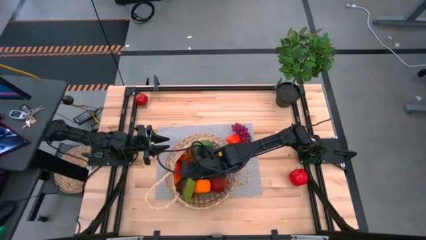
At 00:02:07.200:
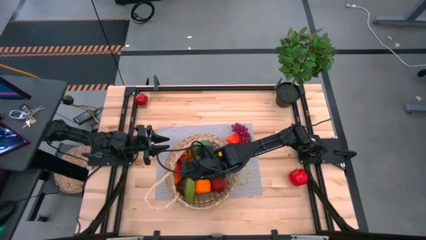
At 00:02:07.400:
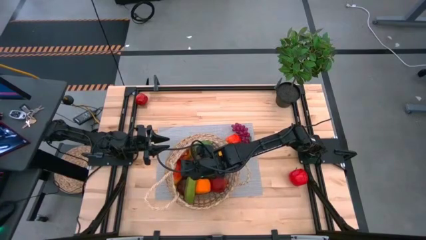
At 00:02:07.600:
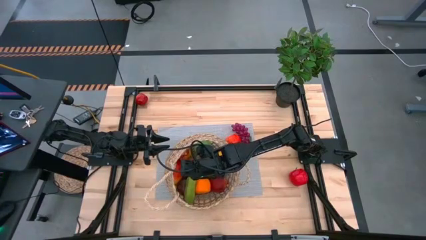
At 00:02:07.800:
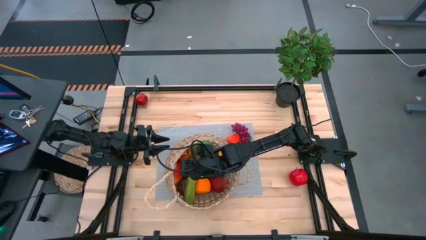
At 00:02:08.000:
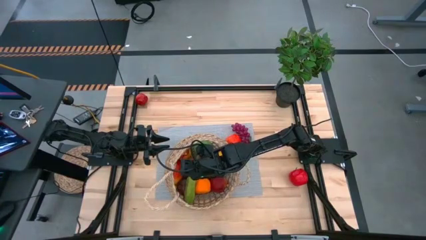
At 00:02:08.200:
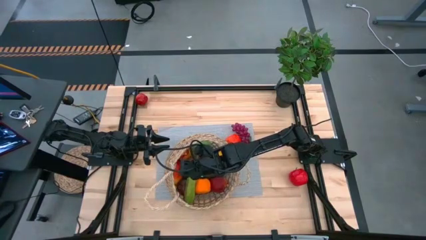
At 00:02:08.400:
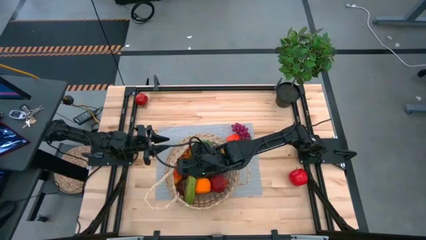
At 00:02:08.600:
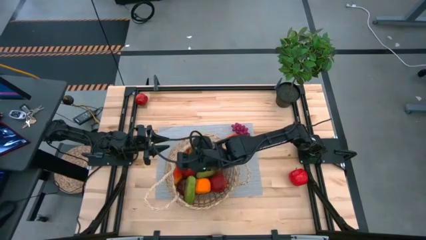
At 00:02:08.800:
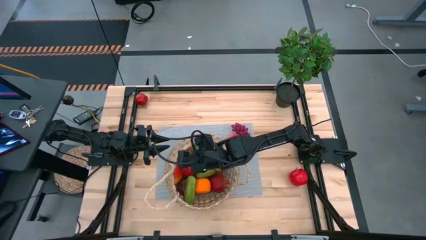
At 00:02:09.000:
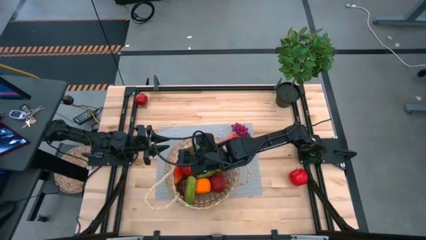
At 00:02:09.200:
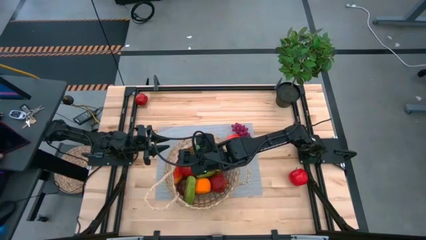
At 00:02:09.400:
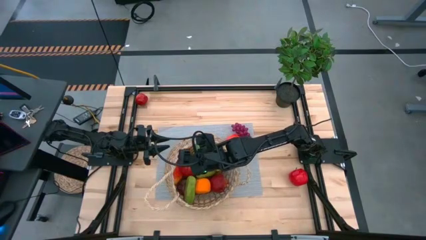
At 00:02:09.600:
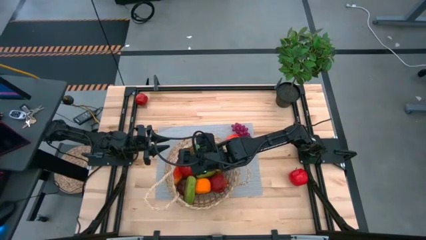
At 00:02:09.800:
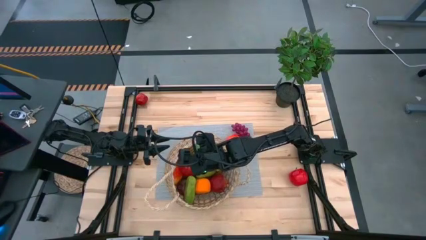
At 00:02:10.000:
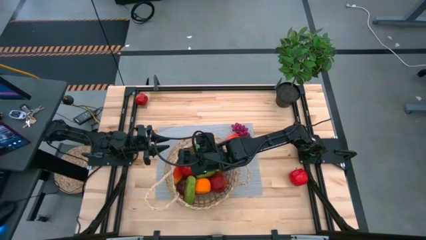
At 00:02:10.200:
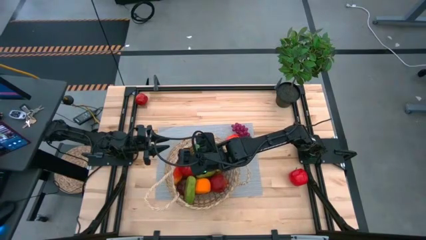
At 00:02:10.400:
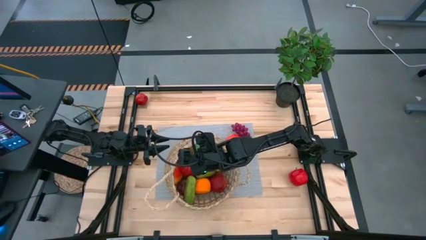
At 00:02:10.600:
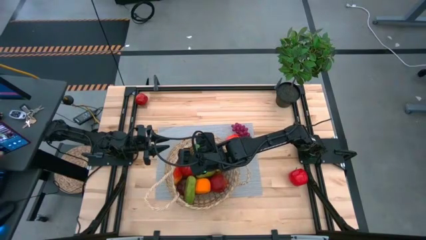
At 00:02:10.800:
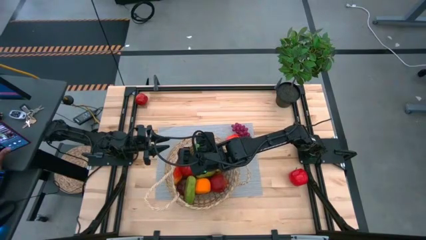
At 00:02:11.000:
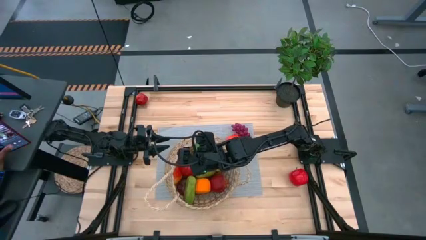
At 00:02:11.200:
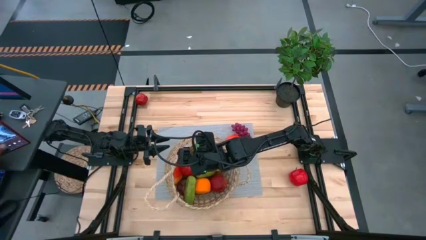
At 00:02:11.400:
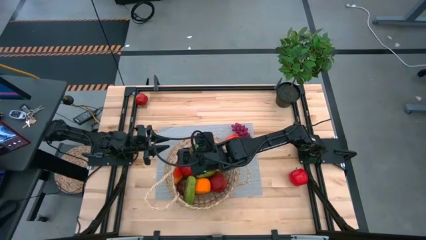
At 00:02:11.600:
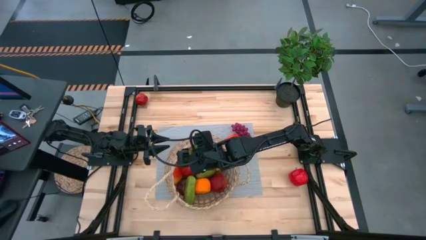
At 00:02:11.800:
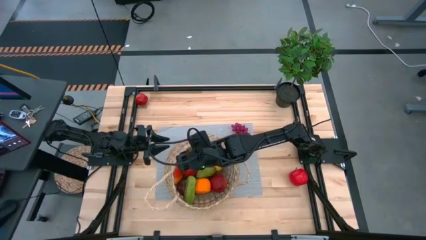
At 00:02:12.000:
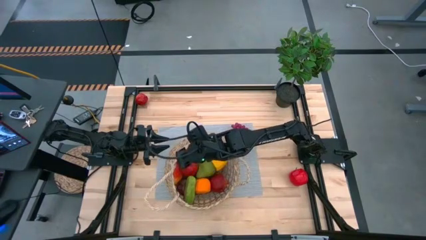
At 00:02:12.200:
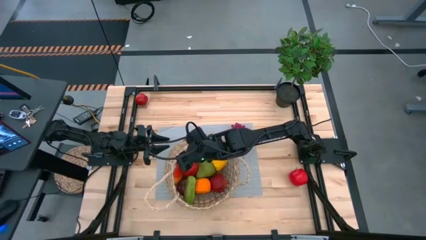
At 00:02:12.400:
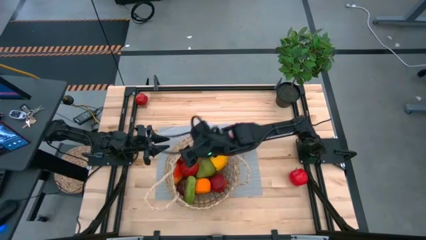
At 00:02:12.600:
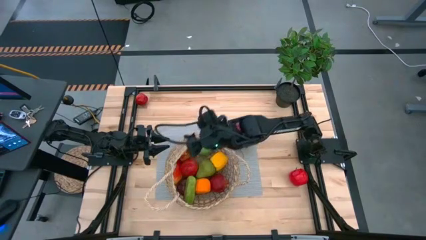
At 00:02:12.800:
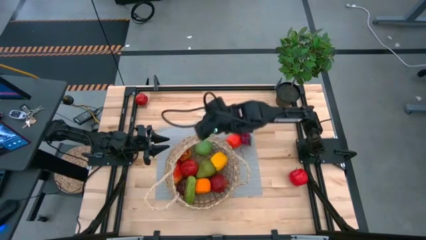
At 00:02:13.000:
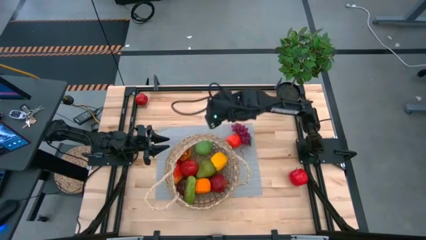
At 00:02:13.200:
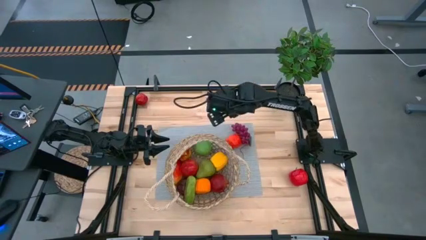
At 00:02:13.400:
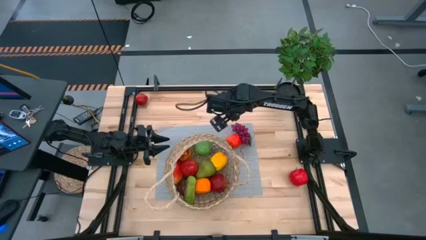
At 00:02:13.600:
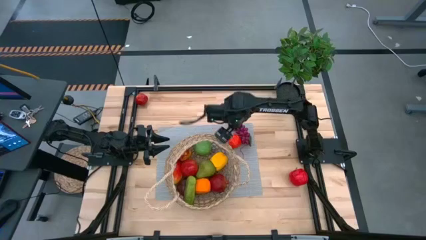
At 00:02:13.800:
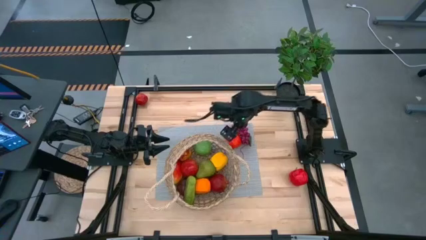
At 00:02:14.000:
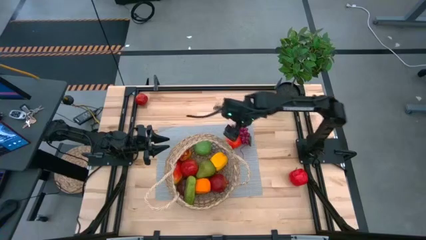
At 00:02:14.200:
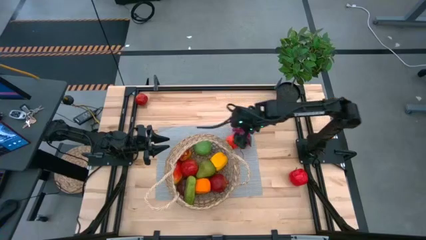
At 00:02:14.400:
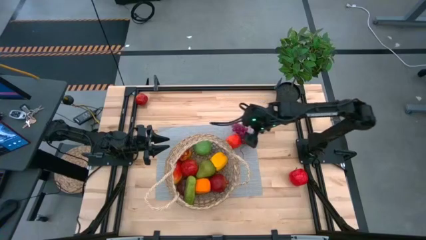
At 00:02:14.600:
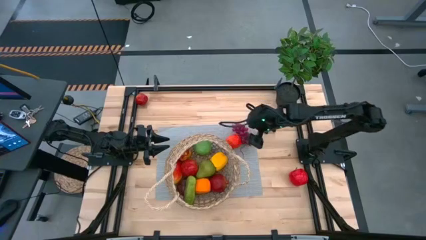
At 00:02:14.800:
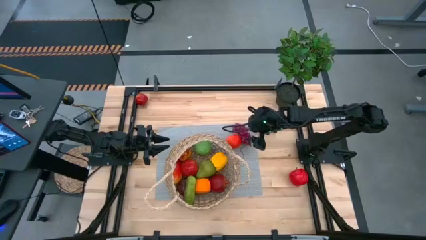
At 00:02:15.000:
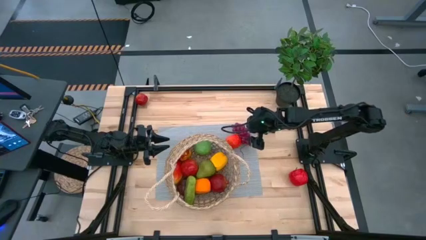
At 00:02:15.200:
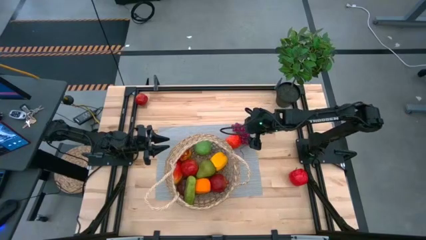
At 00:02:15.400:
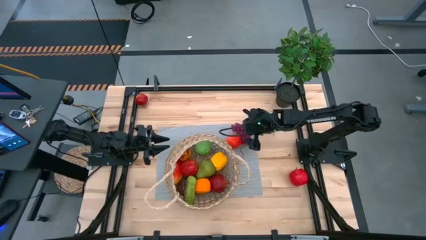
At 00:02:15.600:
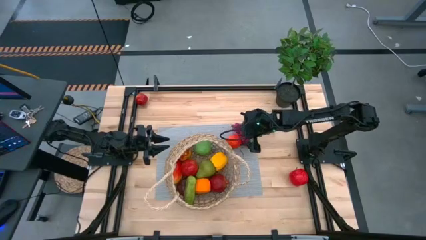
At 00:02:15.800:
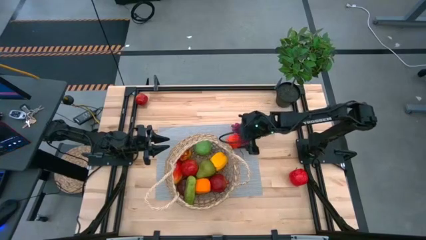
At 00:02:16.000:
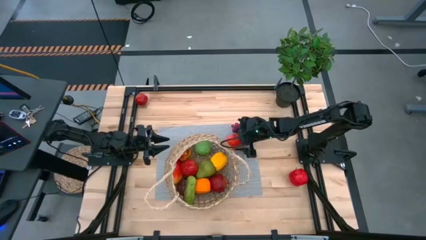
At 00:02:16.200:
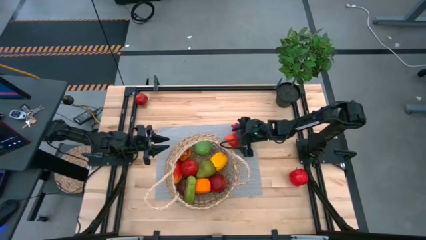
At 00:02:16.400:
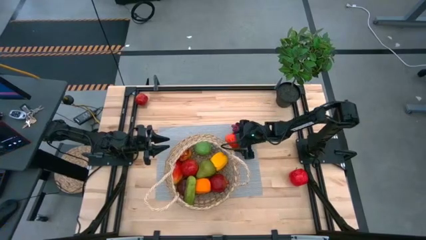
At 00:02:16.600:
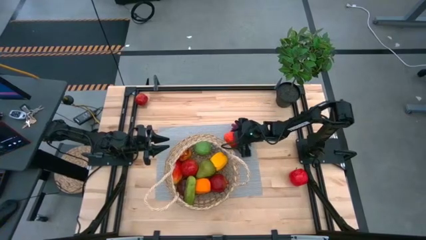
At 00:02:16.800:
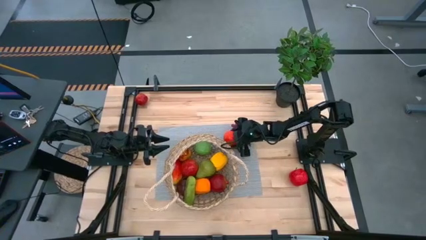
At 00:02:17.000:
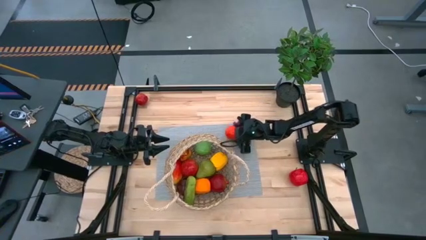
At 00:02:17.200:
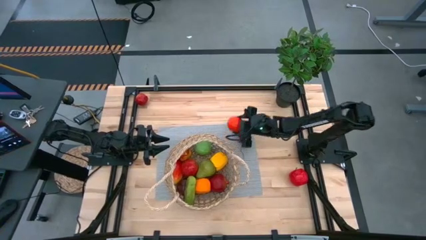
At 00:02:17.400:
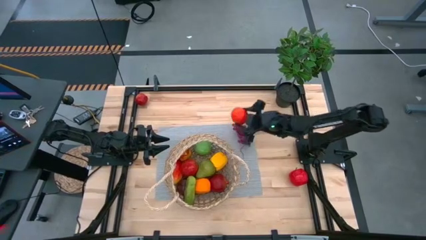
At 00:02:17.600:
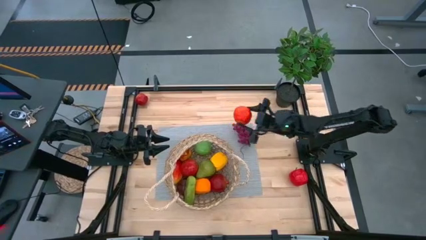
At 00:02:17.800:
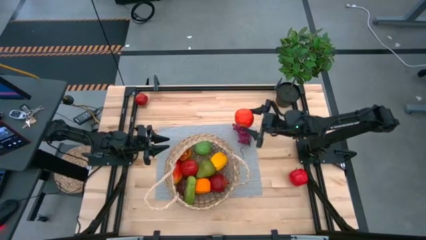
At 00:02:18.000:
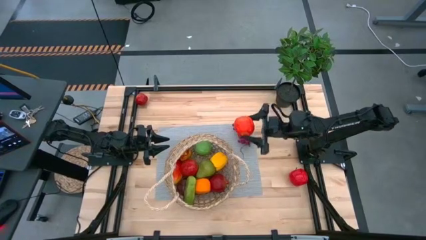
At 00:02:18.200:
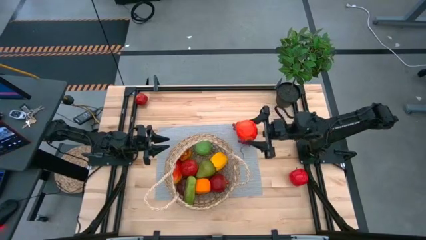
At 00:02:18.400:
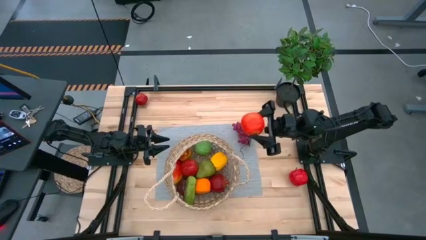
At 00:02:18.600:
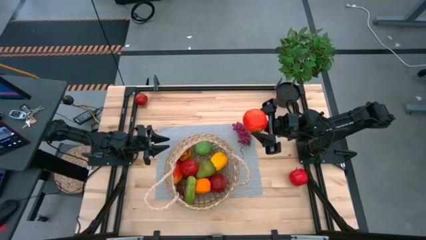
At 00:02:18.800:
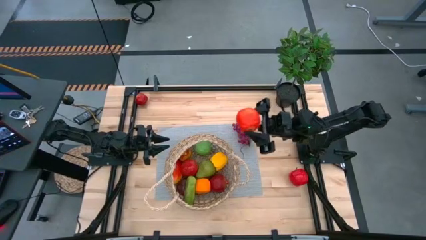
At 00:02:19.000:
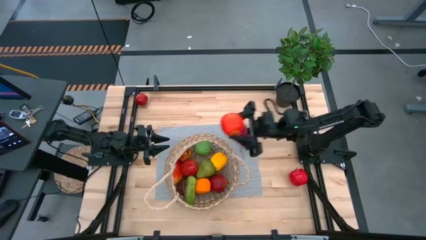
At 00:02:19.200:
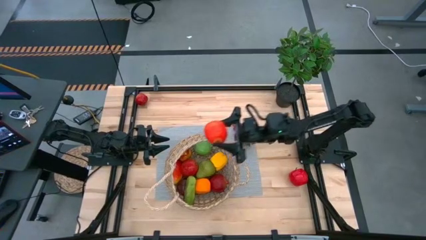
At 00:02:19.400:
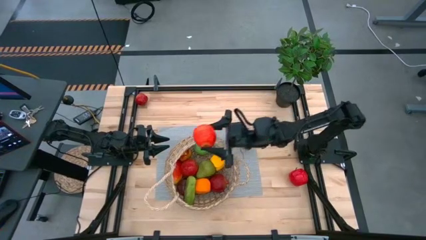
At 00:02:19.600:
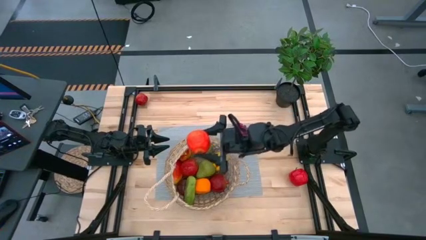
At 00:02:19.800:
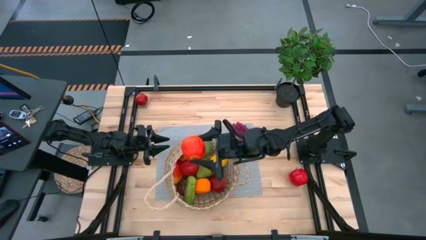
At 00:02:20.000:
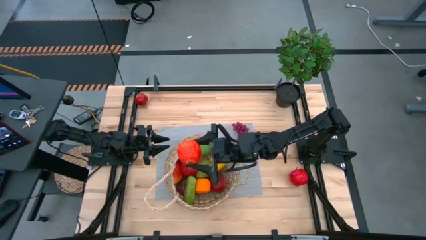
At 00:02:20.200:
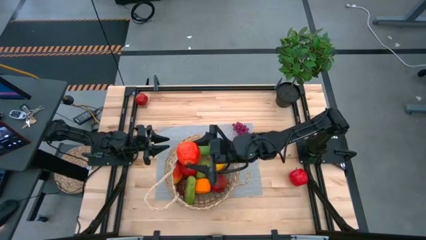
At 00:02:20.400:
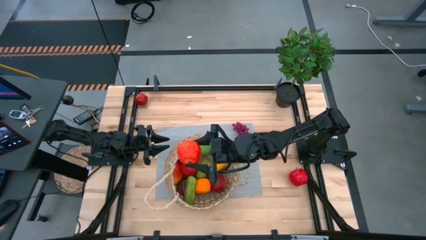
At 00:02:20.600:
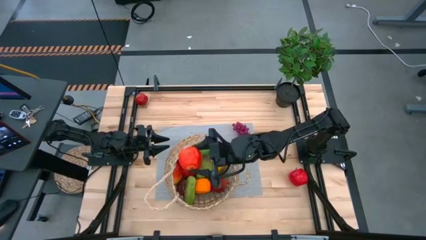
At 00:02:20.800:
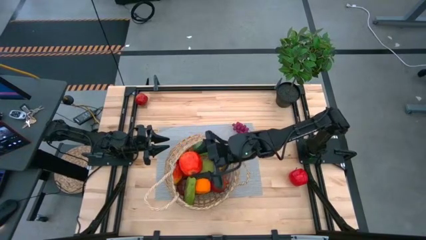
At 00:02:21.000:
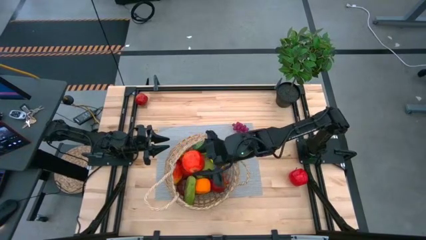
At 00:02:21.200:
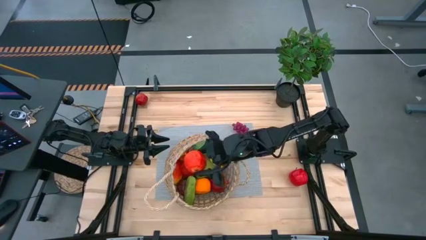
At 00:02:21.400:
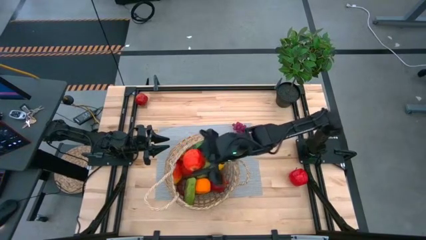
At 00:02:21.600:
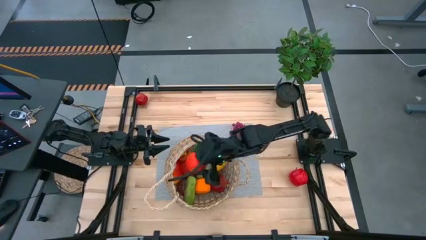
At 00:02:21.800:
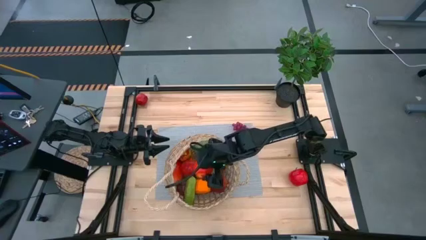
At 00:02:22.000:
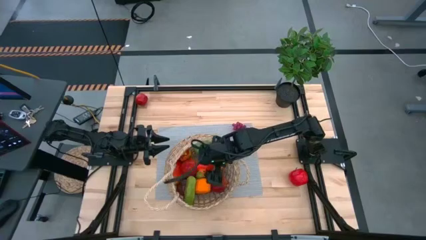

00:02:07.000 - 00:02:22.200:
Task: Build produce basket
Put the middle red apple into the brown basket

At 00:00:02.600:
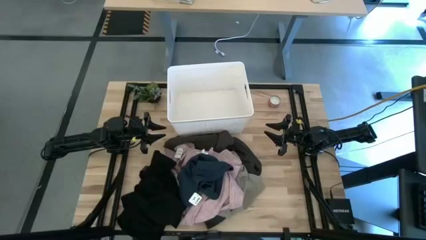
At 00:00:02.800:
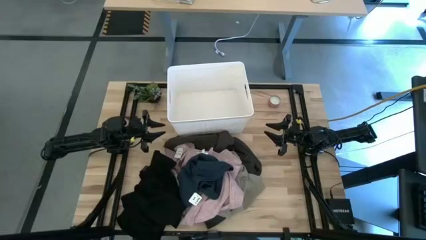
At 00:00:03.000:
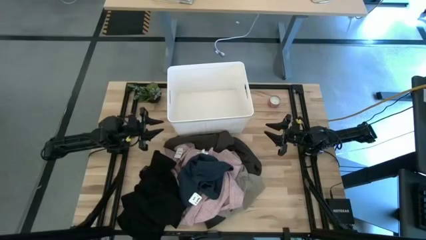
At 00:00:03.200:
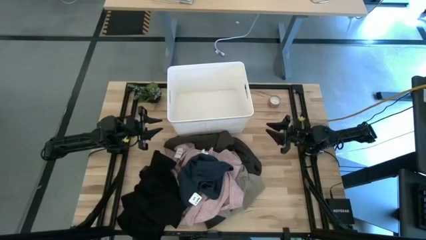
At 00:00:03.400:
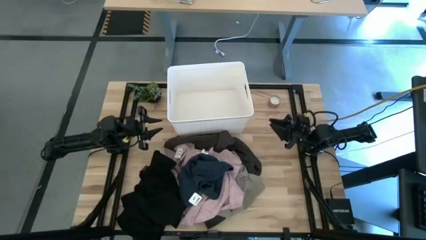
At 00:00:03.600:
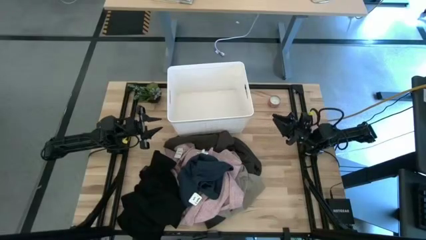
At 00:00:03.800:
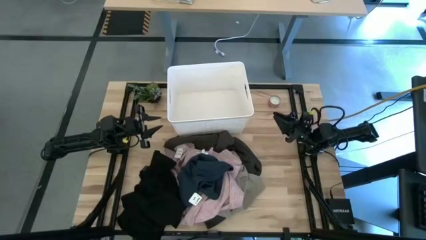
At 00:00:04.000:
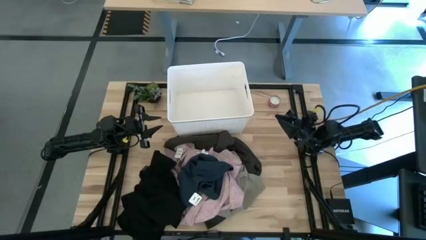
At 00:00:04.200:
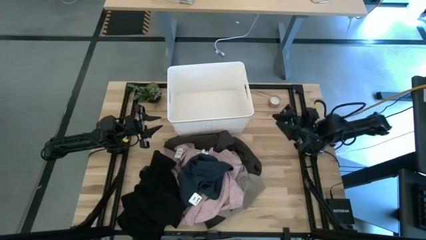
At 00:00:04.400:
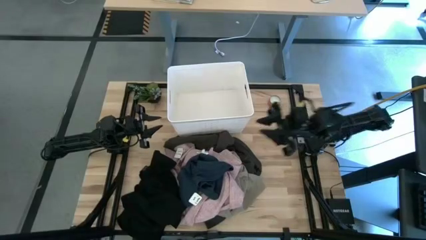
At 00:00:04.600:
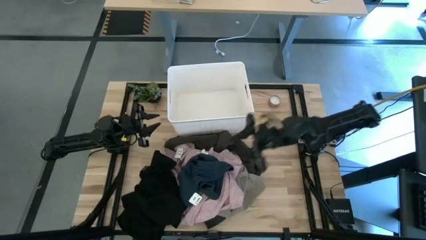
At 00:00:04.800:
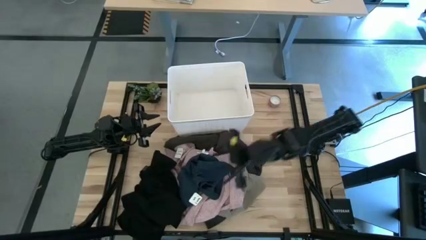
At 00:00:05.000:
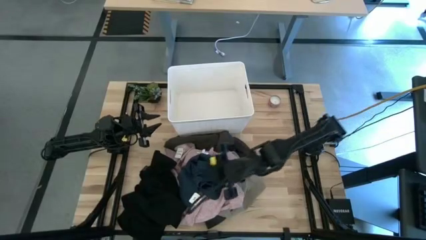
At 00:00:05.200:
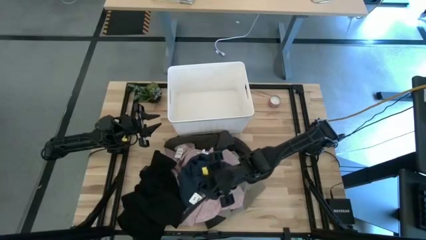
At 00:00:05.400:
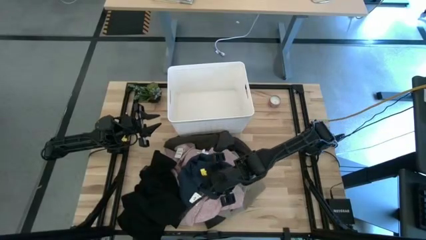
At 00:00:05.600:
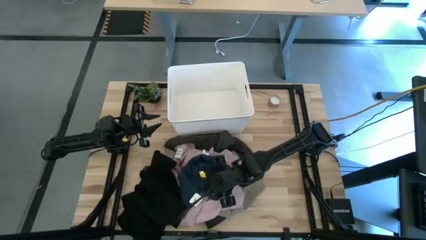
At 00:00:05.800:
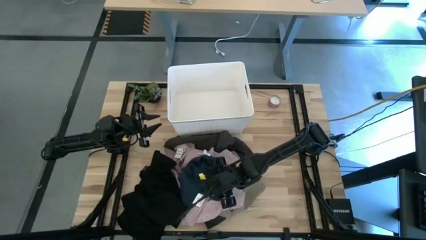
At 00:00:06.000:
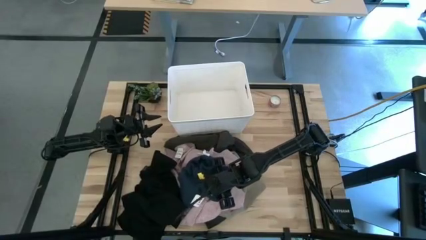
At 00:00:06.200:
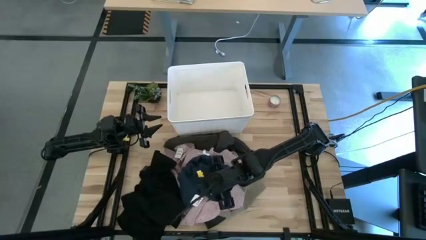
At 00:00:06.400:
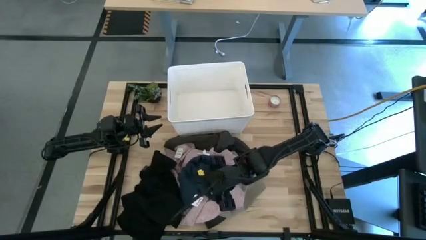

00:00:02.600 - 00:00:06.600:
Task: Sort clothes
Put the dark blue pants into the white bin
